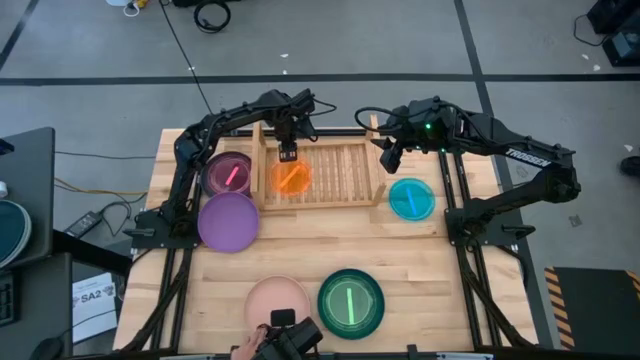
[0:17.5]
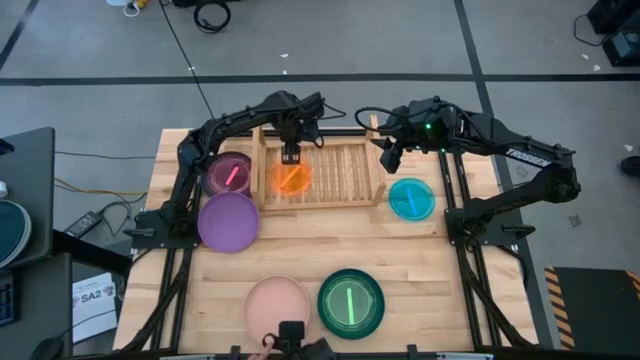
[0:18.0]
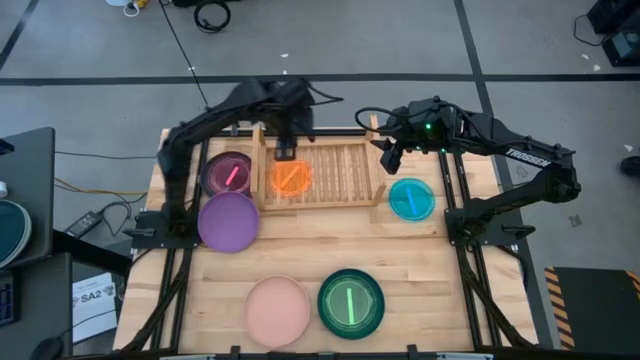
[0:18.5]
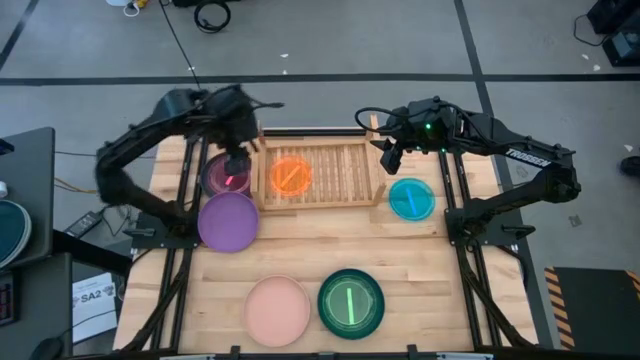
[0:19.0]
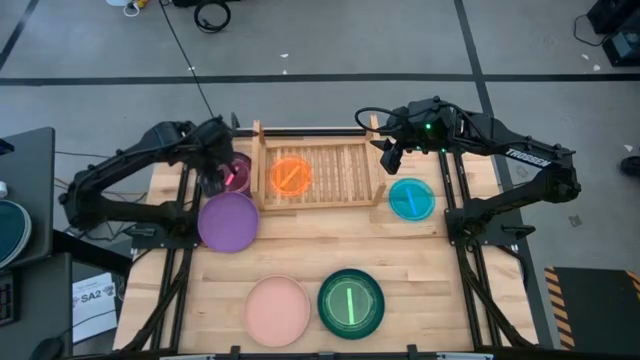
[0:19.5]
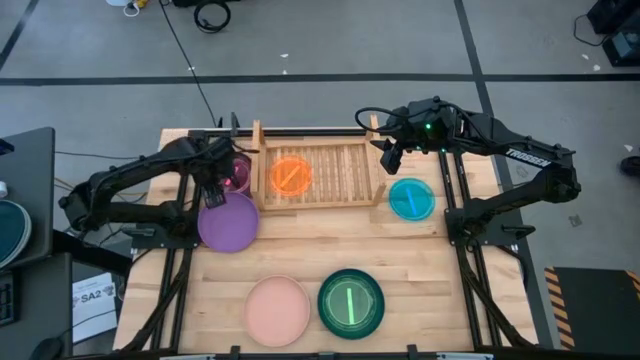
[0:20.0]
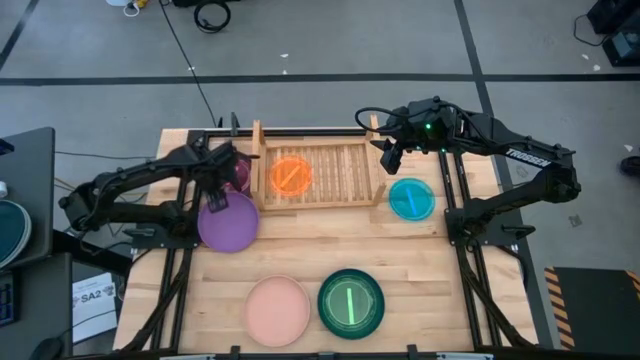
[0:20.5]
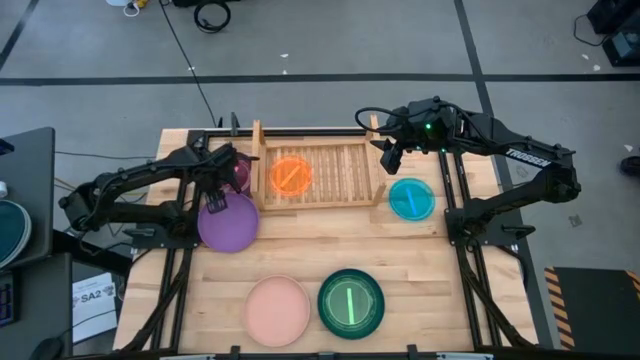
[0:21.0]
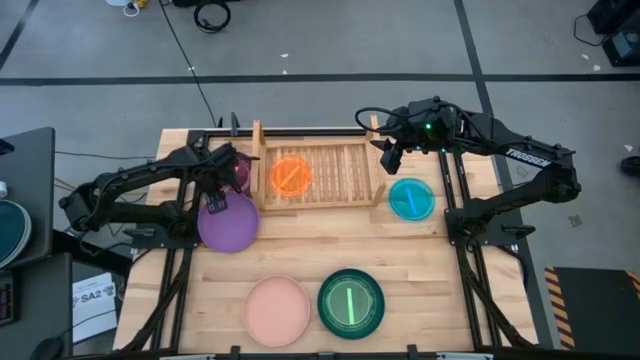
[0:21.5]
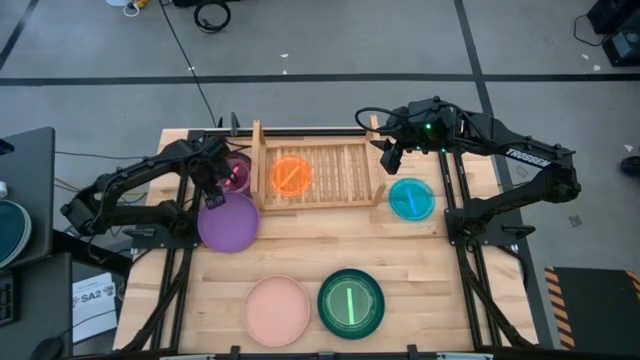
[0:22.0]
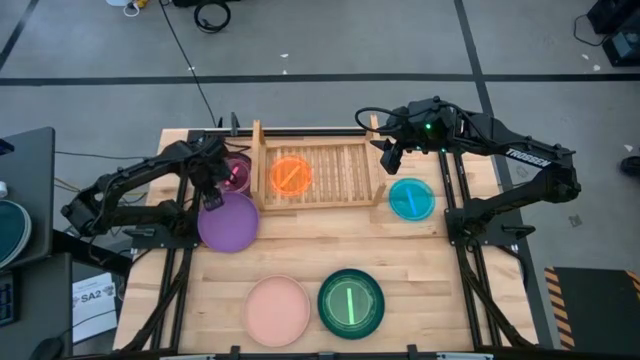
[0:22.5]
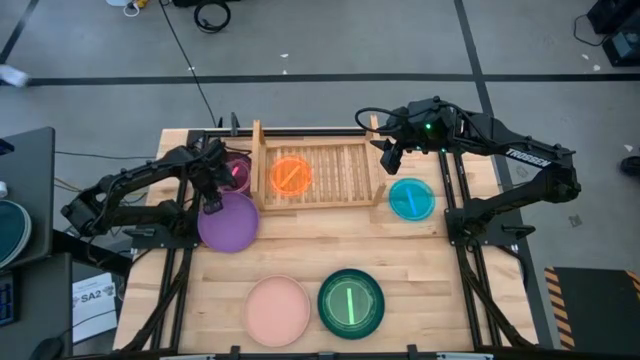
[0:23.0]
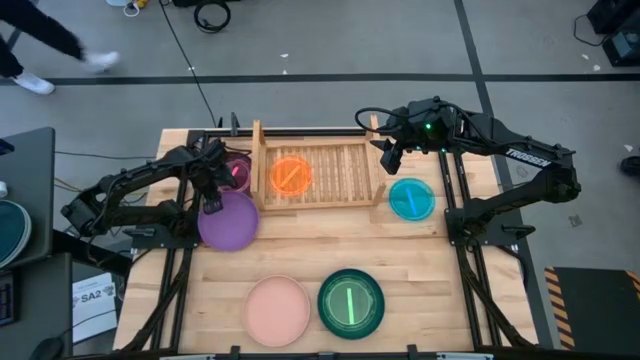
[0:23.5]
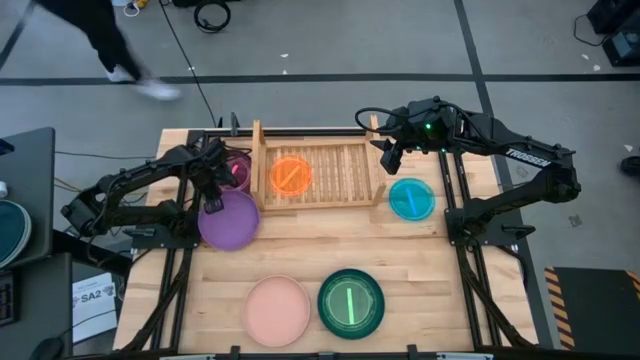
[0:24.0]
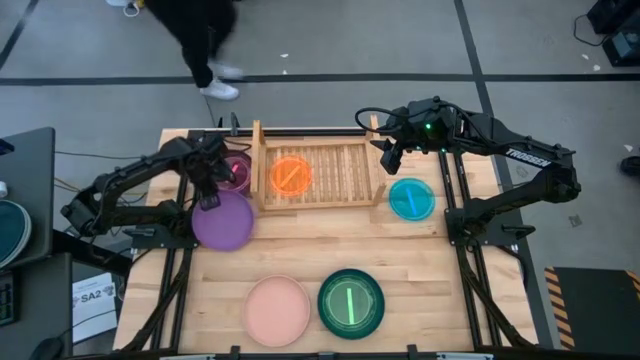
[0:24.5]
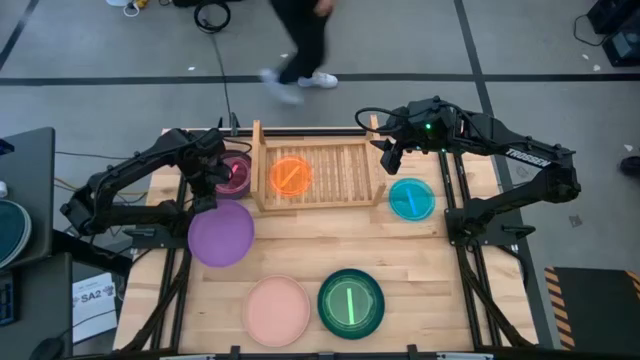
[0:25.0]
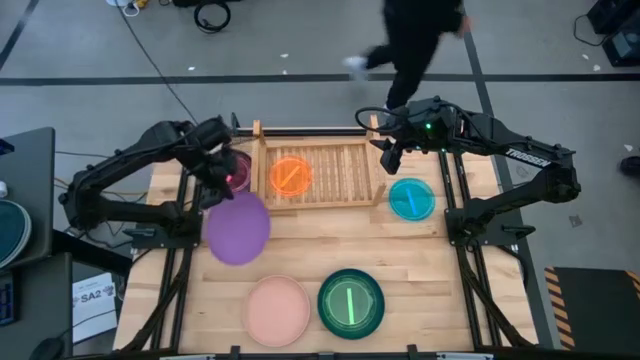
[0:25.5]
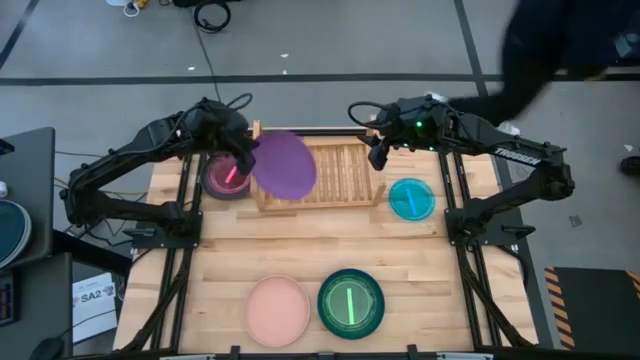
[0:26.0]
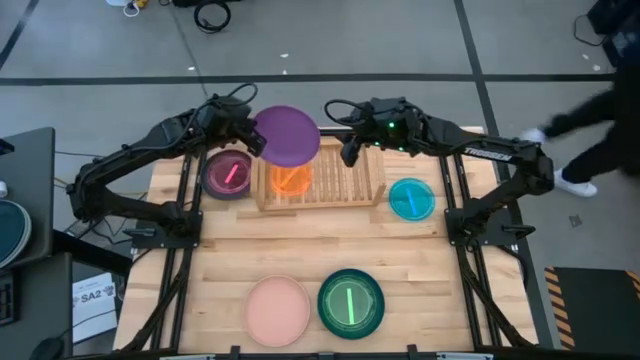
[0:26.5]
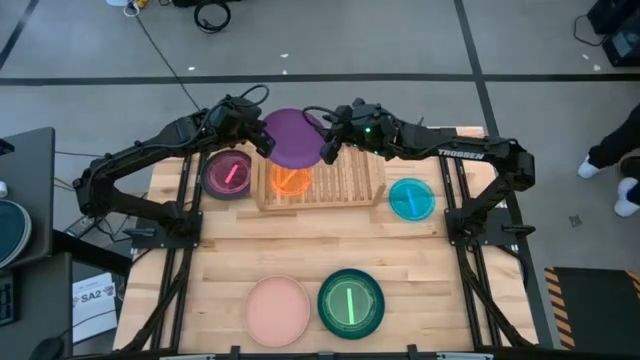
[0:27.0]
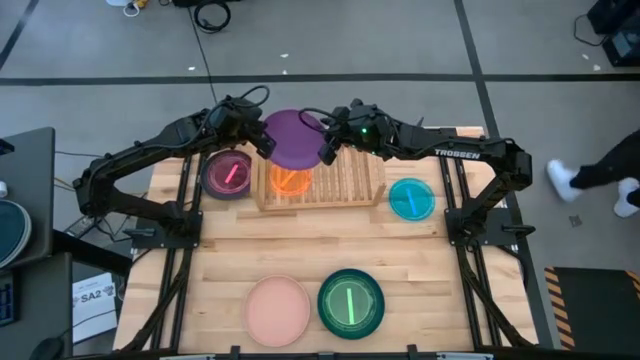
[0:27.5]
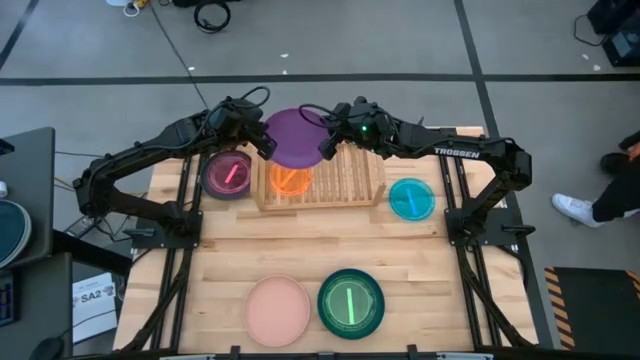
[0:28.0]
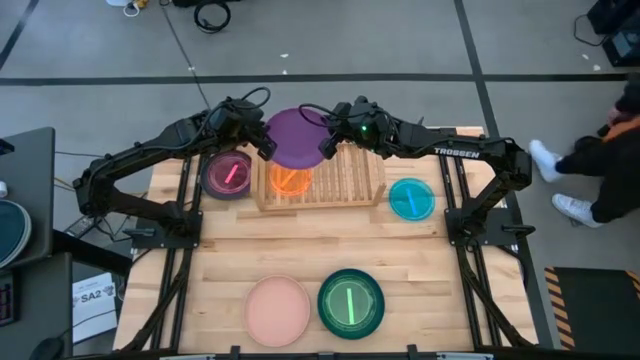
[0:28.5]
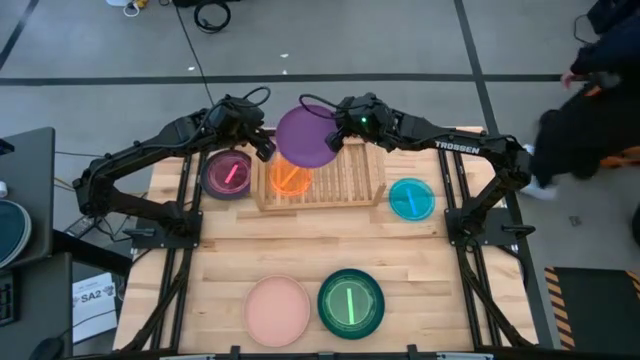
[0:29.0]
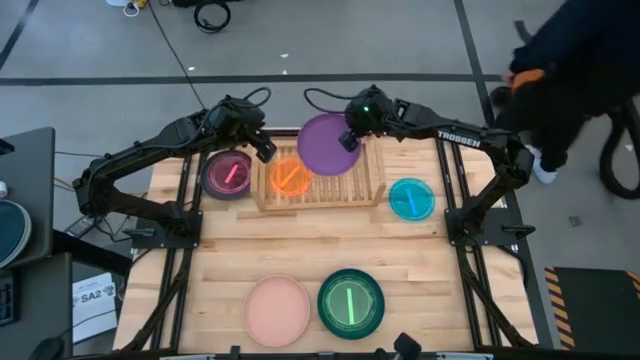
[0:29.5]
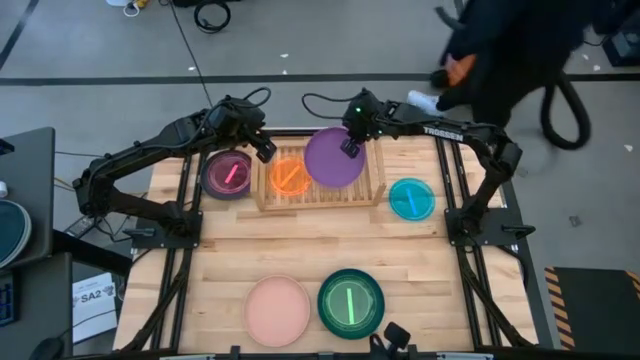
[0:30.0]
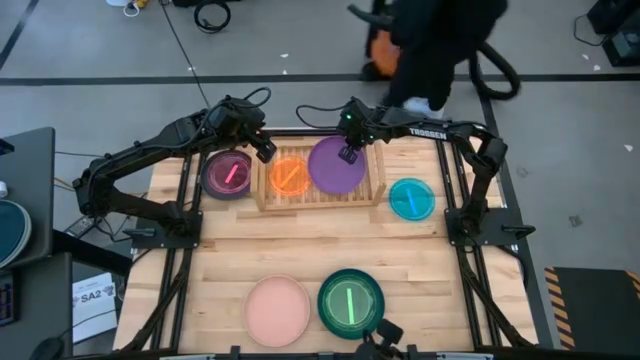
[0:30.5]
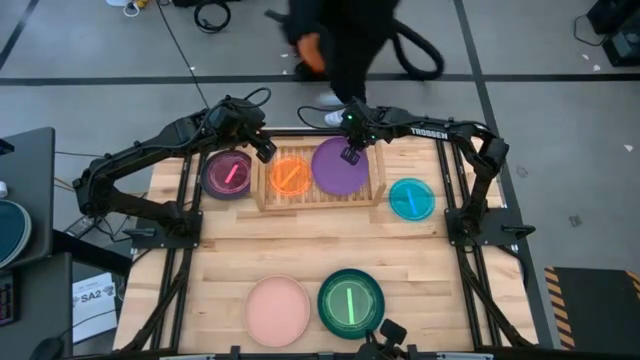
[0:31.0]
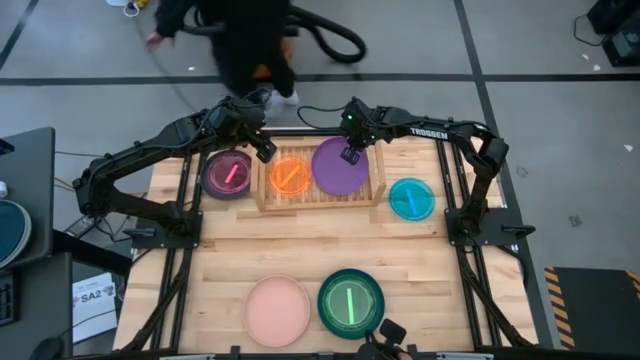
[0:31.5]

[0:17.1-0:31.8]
Task: Place and stack plates onto a shelf
Put the large purple plate on the shelf

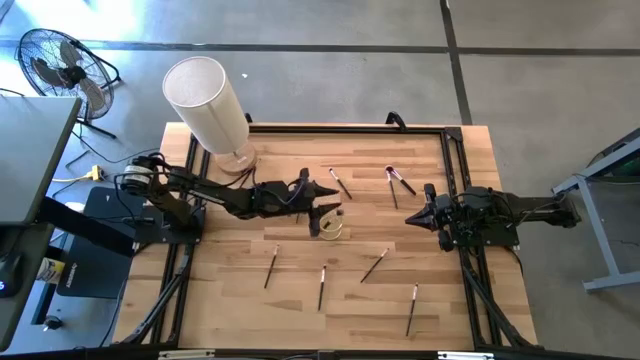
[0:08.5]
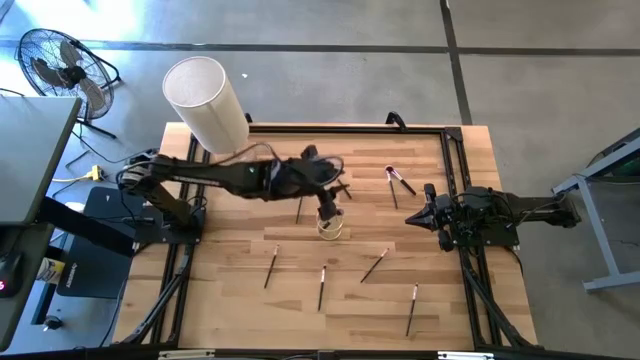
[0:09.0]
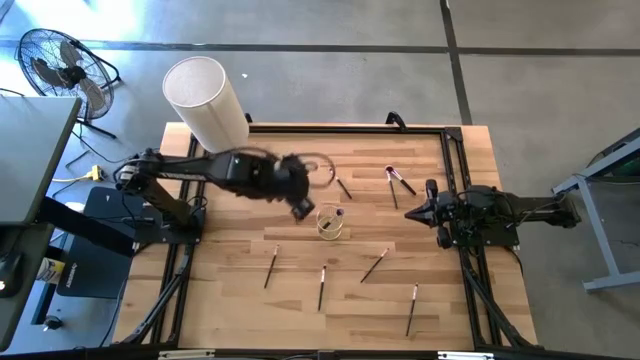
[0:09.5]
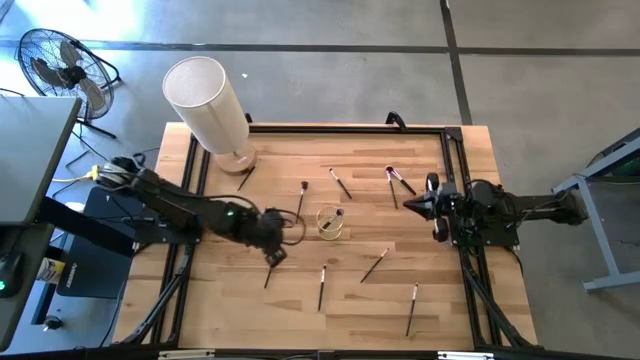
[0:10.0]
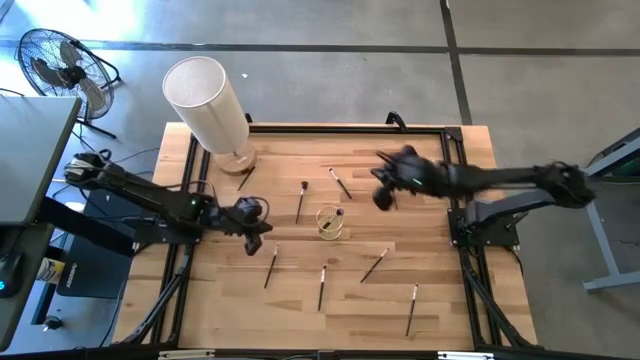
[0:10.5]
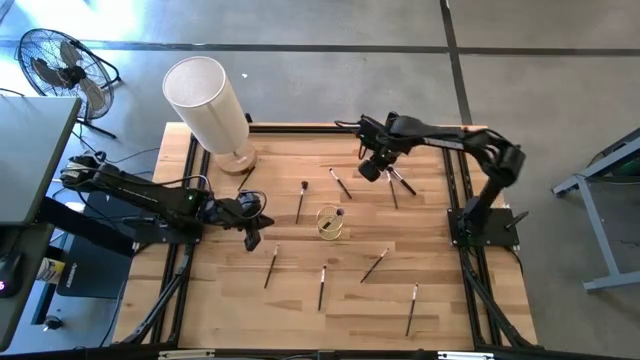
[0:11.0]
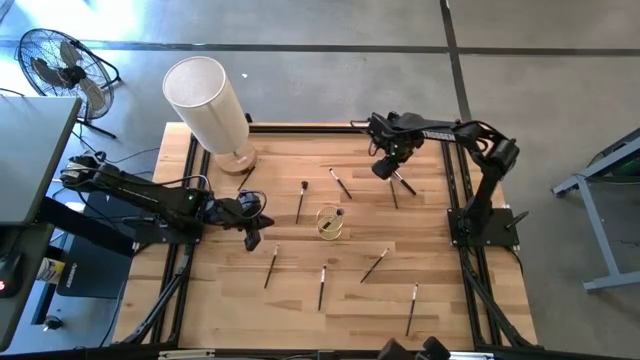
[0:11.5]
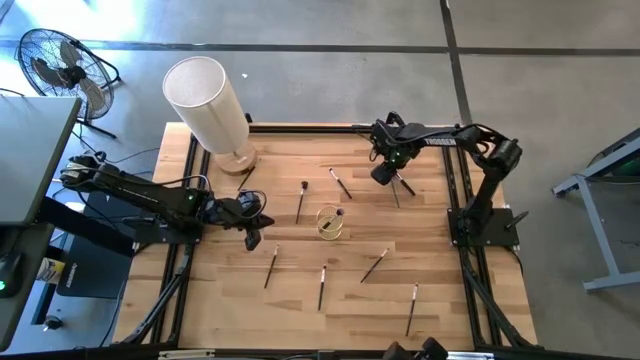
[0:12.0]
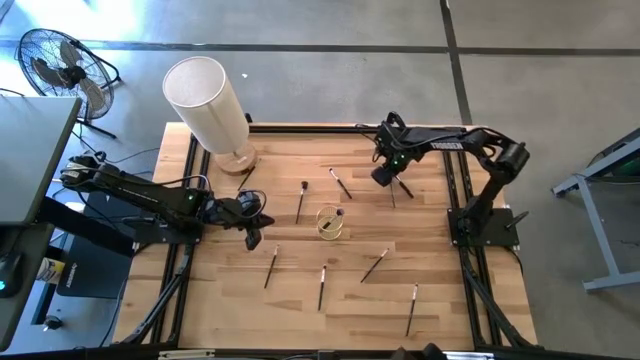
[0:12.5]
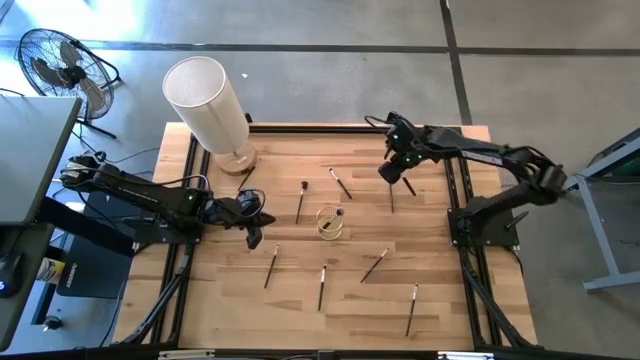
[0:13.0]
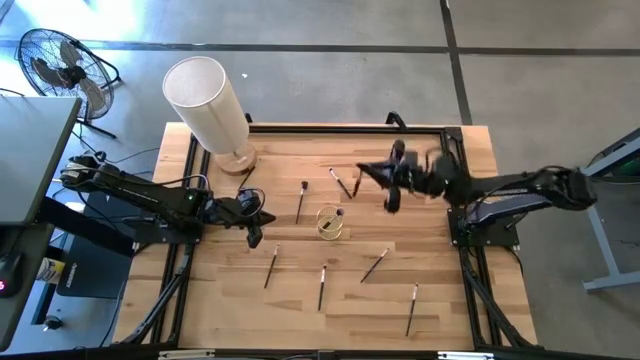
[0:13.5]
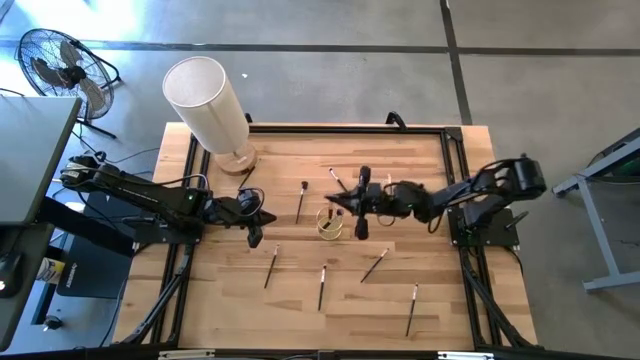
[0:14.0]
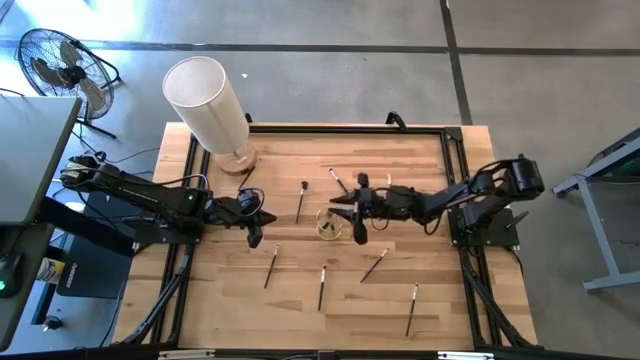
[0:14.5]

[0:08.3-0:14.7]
Task: Put items in baskets/containers
Put the powder brush into the wire organizer
